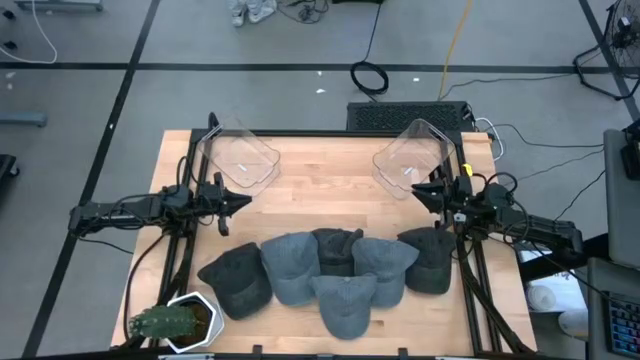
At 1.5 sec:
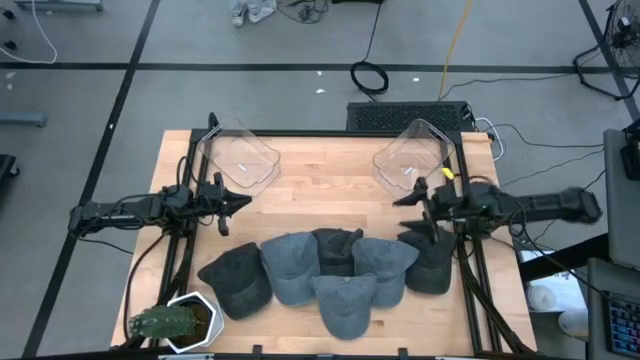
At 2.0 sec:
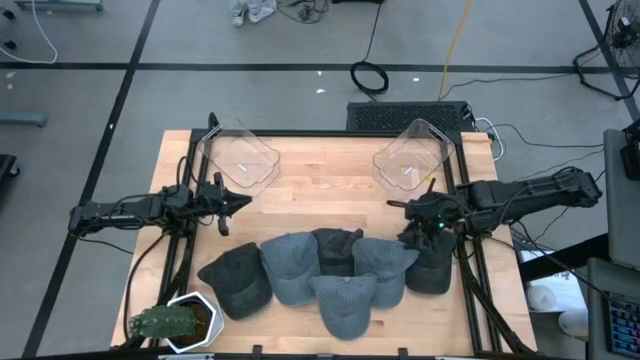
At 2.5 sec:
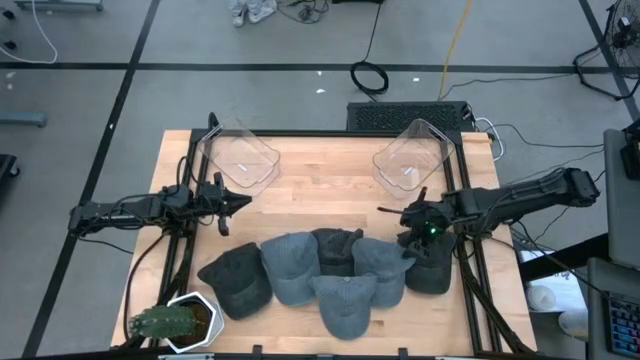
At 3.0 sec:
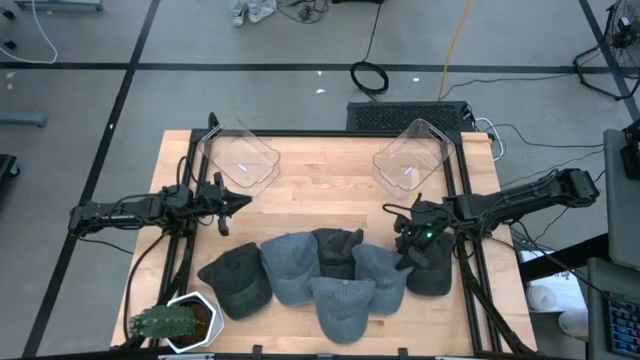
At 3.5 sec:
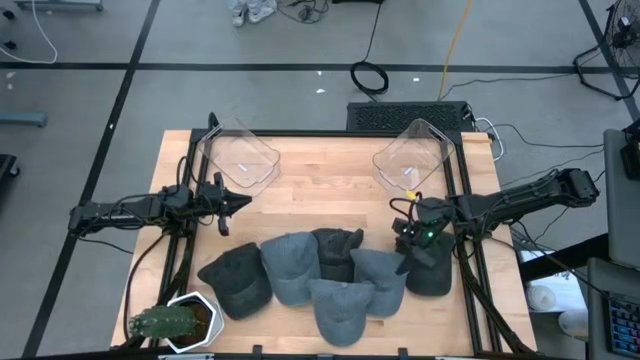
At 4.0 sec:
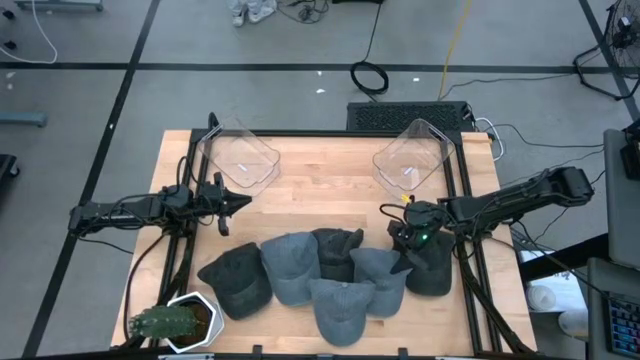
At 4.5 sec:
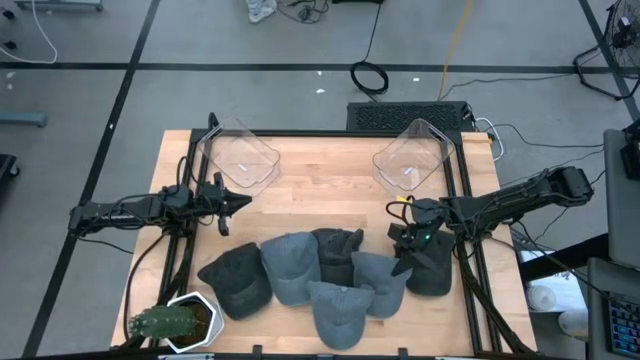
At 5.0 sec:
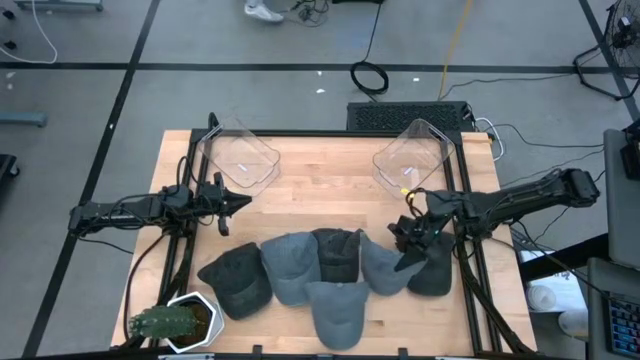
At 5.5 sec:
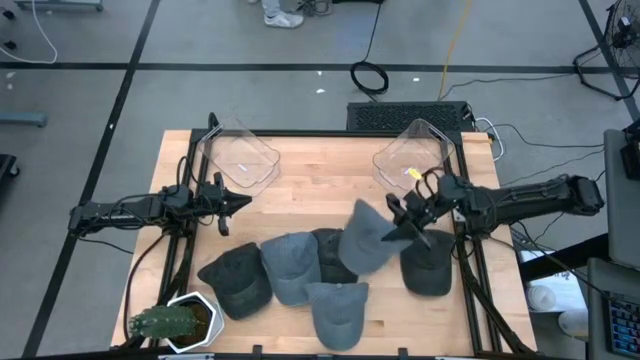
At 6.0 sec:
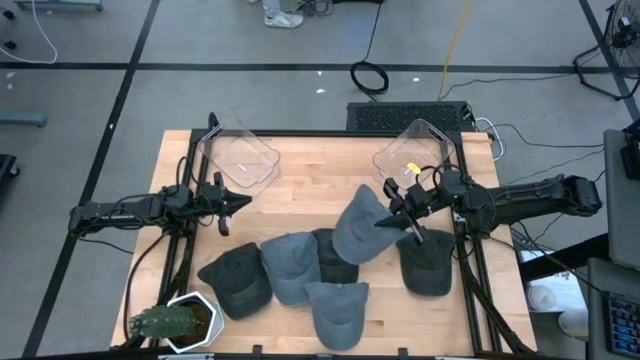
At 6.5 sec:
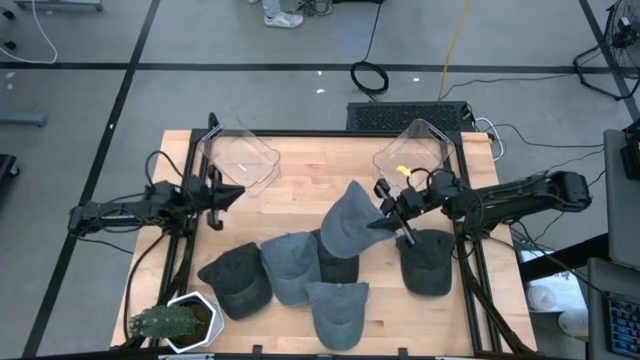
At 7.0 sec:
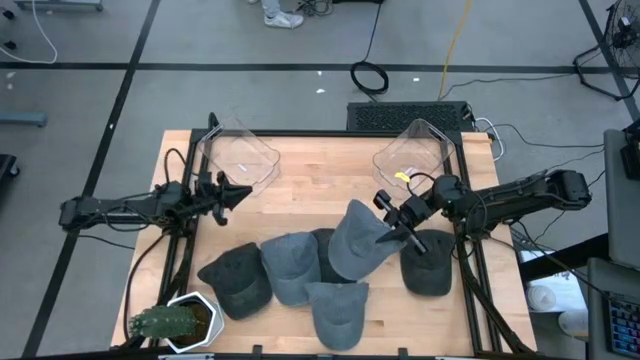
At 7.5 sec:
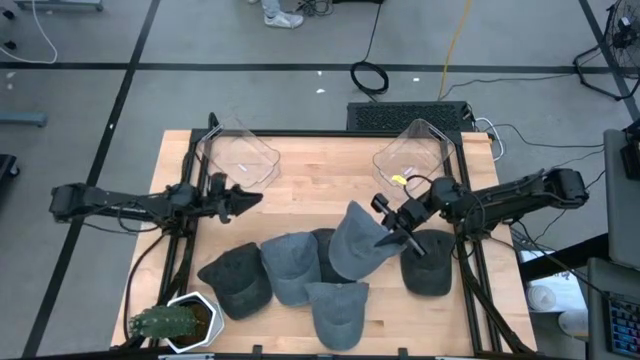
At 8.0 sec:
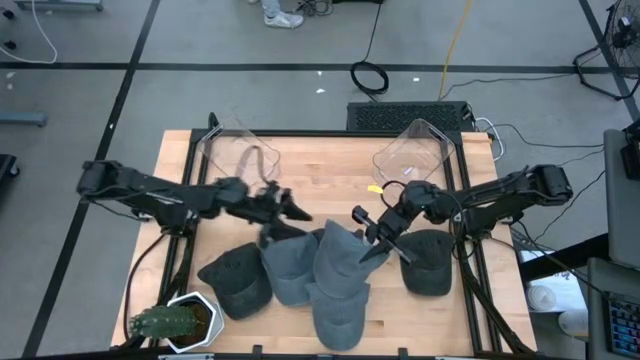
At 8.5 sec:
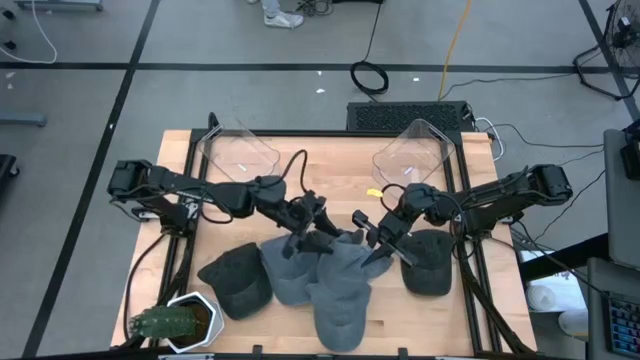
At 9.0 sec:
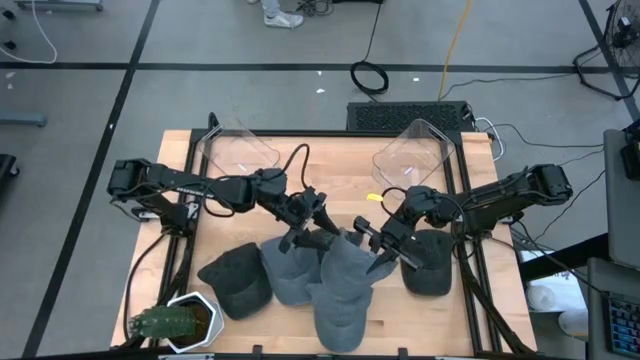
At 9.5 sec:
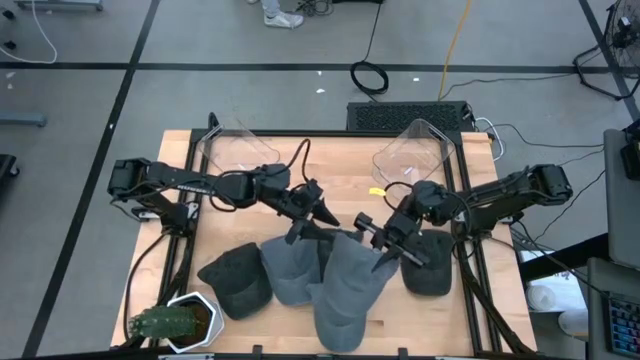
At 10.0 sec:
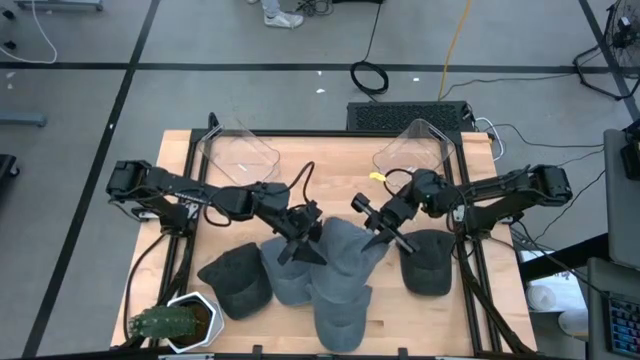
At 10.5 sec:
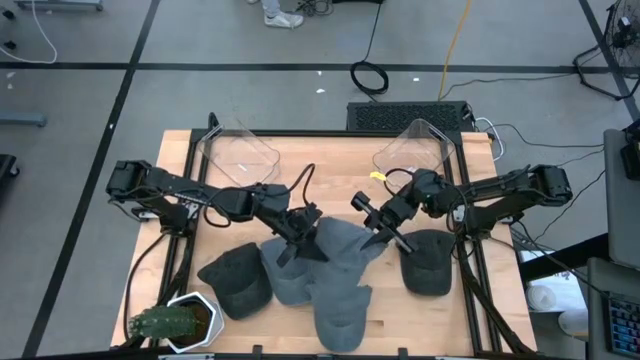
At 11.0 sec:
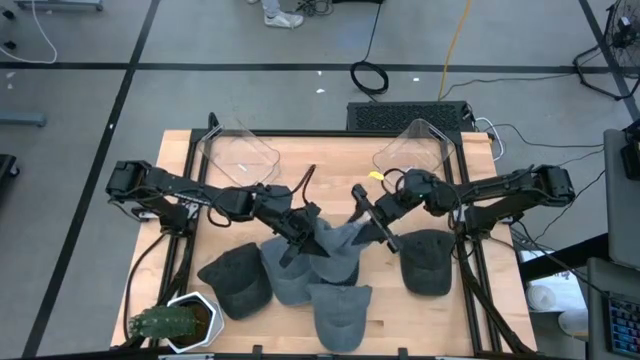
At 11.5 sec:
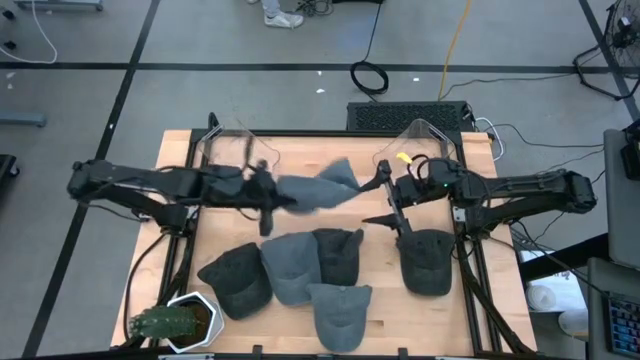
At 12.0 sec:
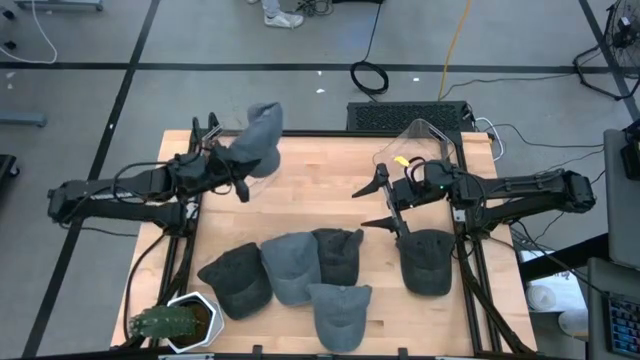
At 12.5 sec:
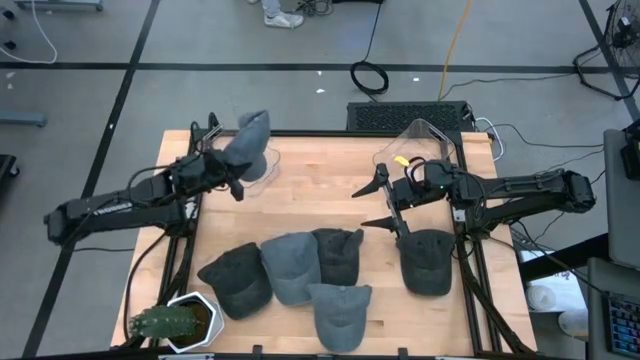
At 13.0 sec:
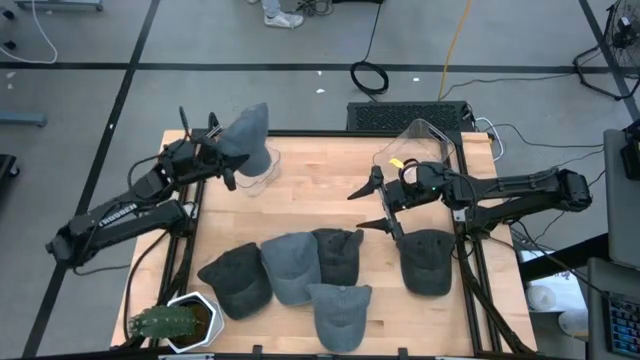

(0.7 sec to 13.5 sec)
Task: Pick & Place hat
Put the right blue cap into the left transparent bin
